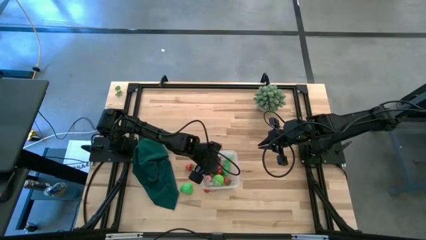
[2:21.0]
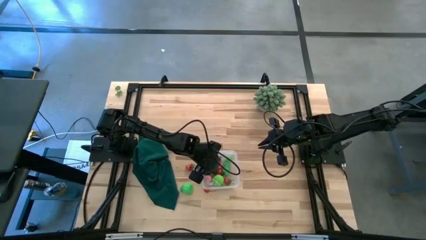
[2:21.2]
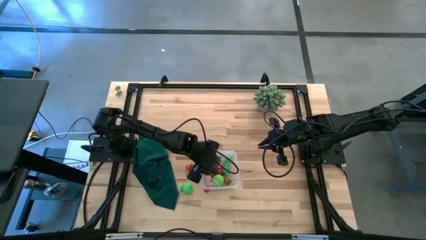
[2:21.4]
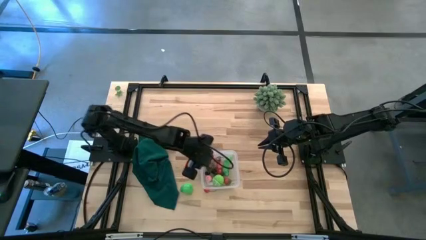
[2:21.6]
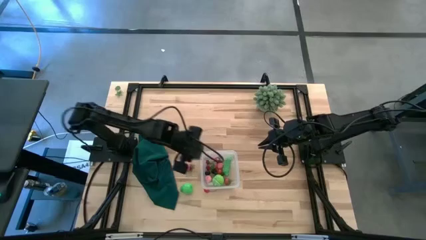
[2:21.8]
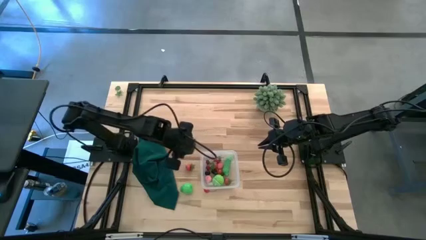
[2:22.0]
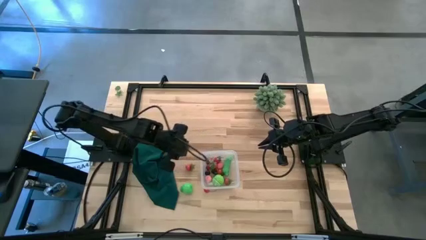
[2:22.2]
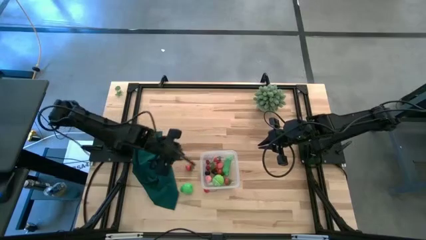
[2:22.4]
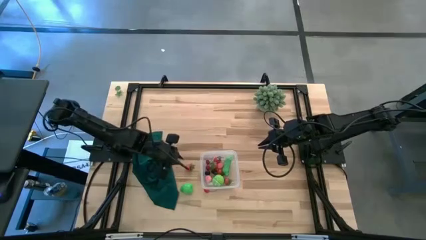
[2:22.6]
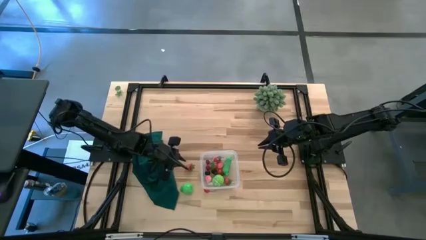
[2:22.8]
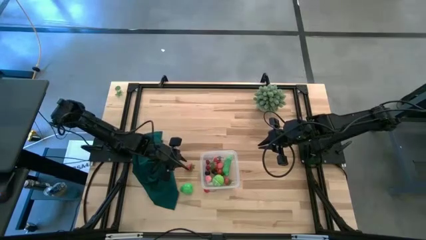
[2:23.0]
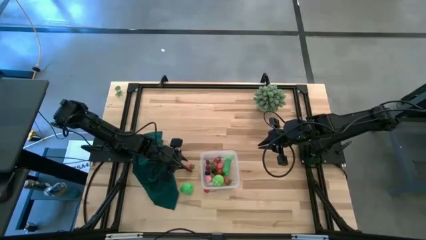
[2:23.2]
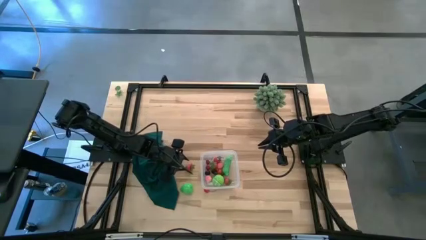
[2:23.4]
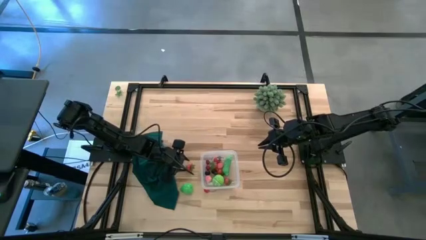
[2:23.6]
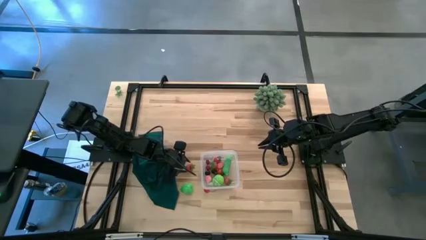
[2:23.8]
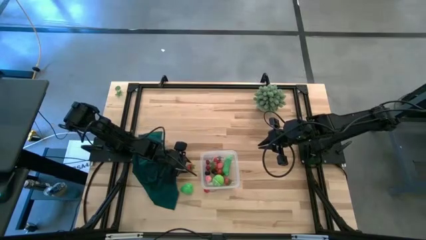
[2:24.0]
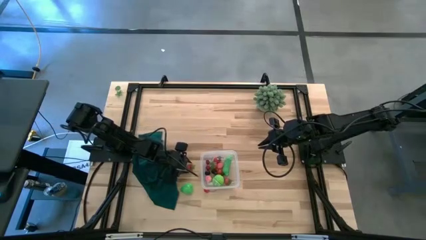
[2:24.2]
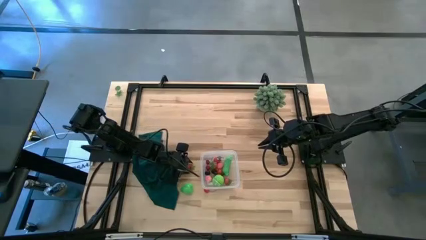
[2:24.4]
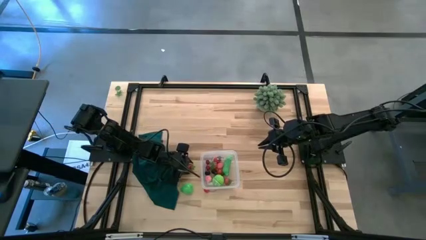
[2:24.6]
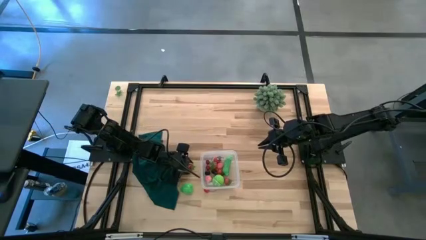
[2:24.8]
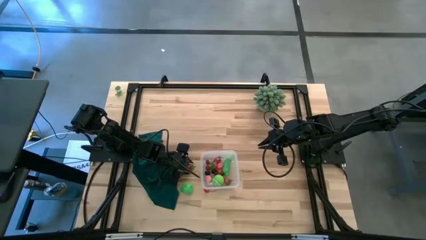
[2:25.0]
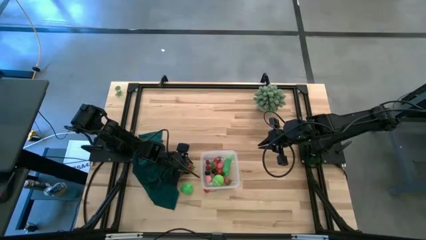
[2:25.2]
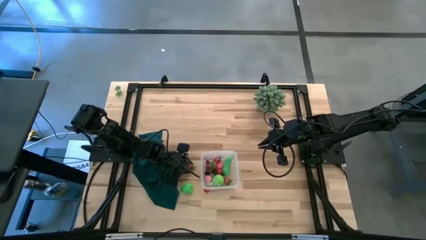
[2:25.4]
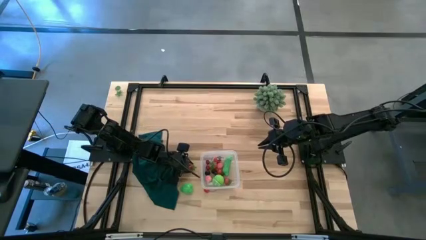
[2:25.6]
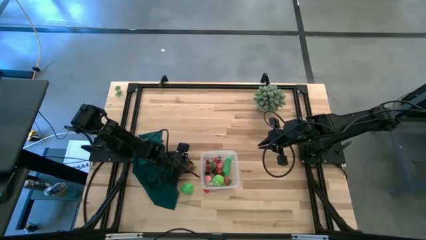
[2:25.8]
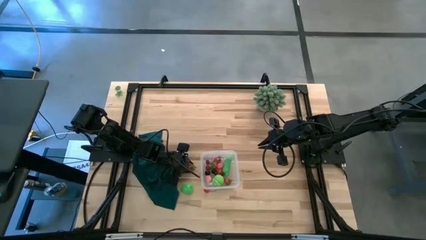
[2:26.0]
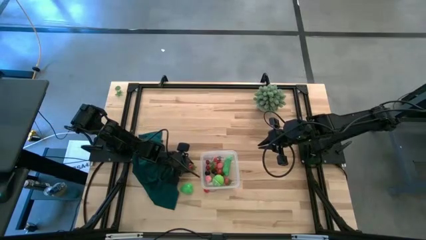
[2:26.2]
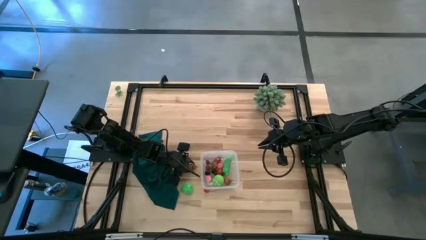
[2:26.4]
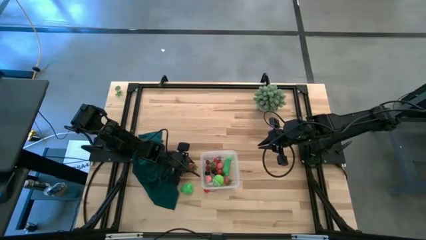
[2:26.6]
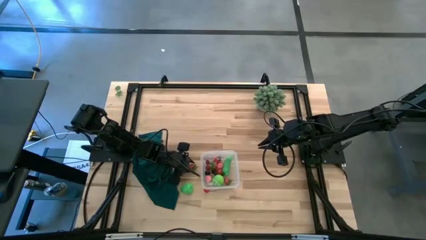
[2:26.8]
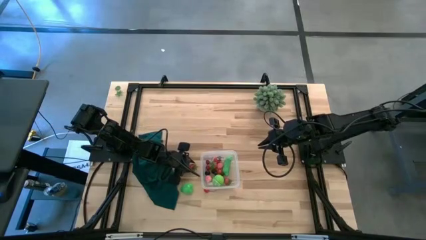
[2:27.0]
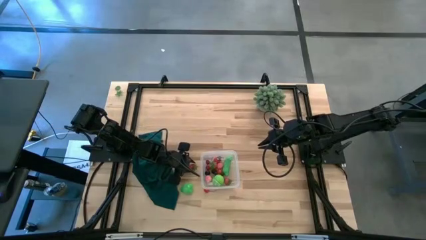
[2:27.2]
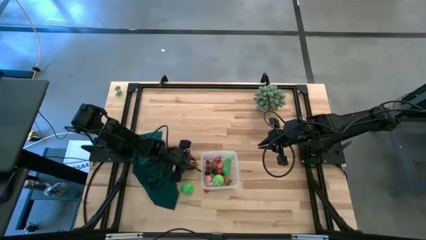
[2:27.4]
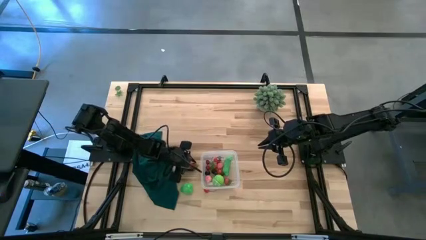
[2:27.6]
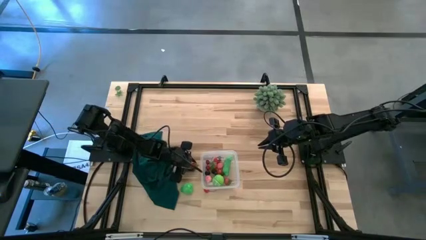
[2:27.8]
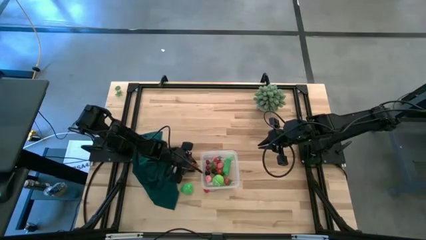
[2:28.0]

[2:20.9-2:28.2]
Task: Pick and placing Produce into tupperware
Put the red strawberry into the transparent bin

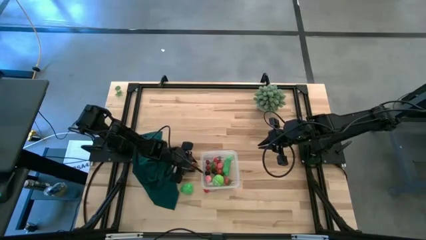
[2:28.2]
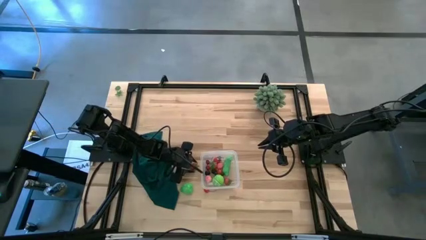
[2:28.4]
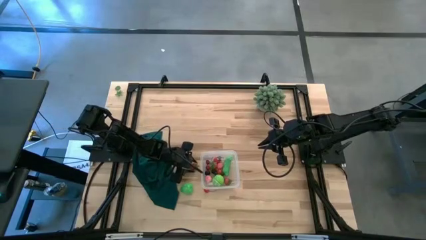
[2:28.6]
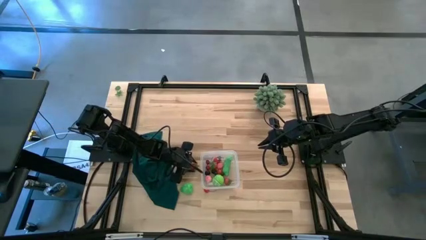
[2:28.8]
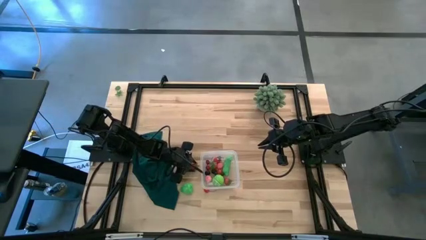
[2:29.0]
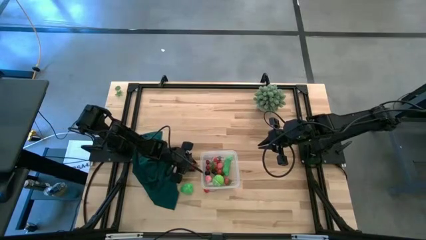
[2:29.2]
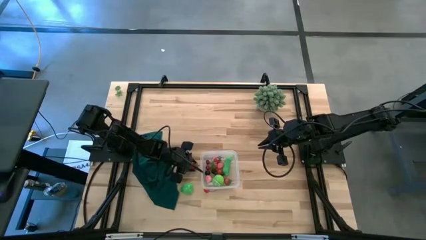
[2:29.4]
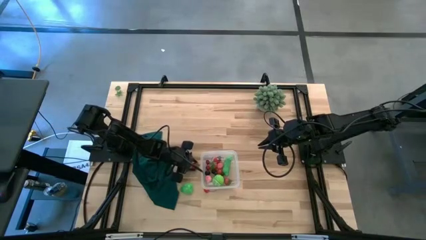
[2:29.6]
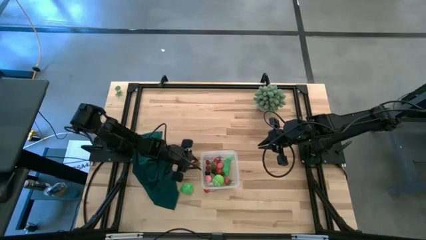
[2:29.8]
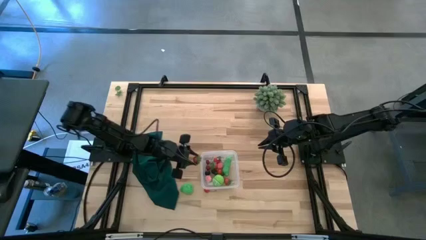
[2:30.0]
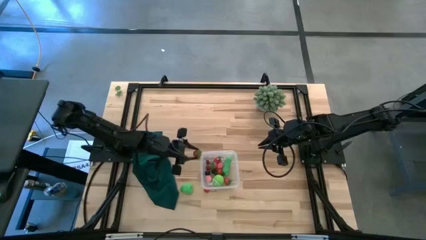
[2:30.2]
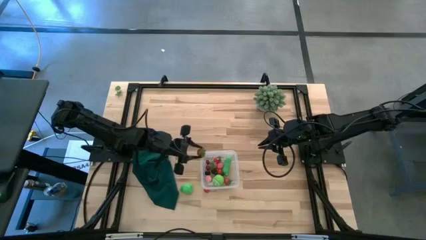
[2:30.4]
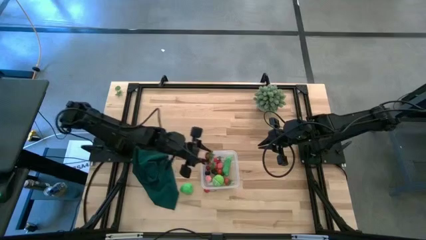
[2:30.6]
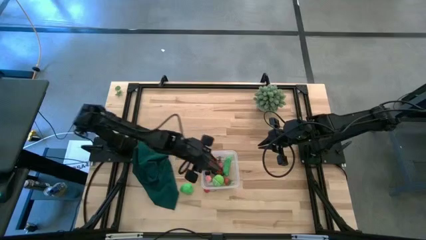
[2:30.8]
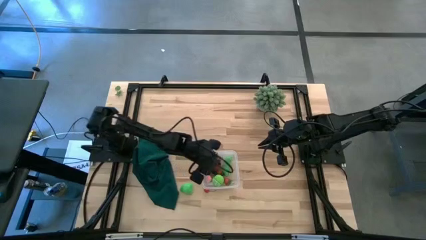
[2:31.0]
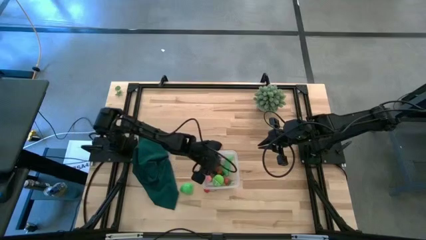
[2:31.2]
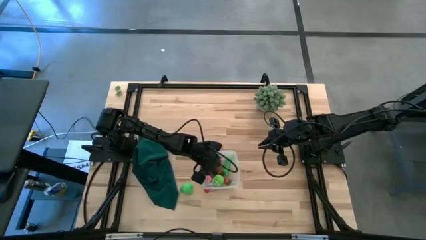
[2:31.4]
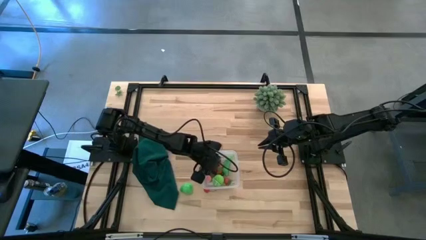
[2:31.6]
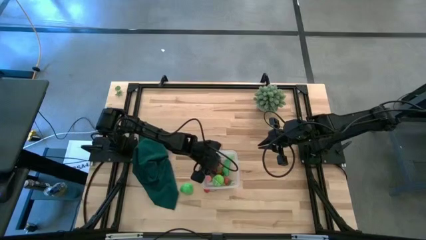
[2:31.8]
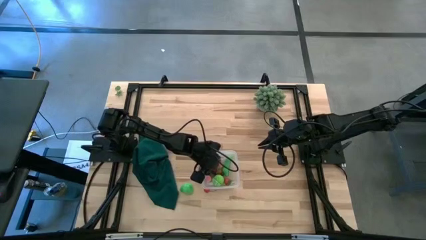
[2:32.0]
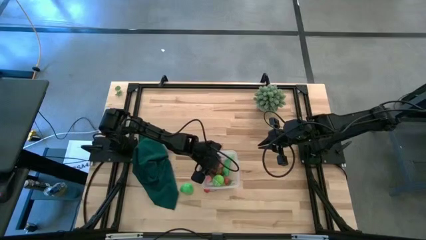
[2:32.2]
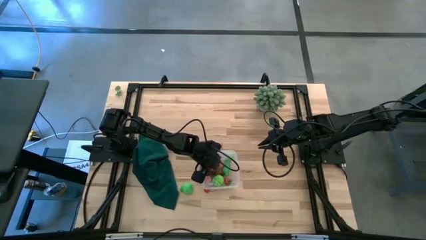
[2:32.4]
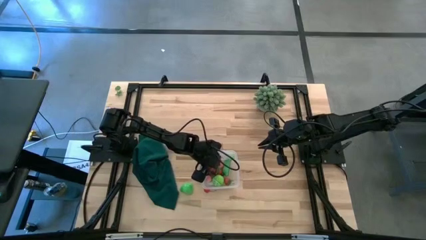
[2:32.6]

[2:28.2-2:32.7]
Put the red strawberry into the transparent bin

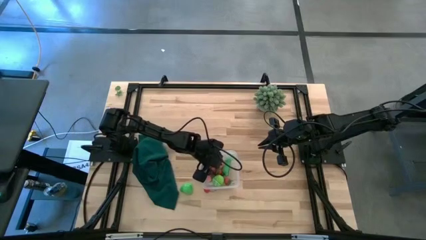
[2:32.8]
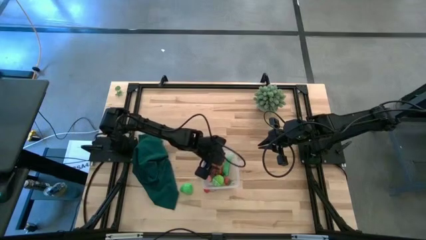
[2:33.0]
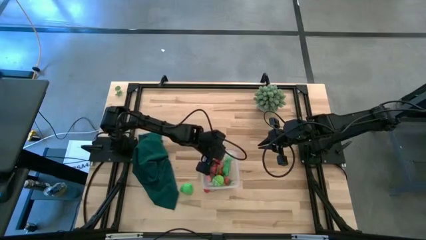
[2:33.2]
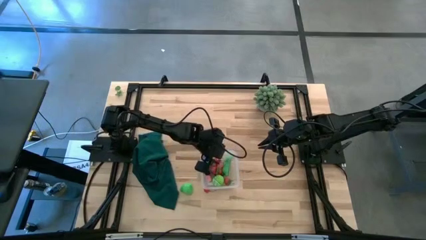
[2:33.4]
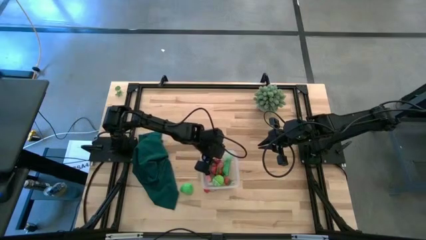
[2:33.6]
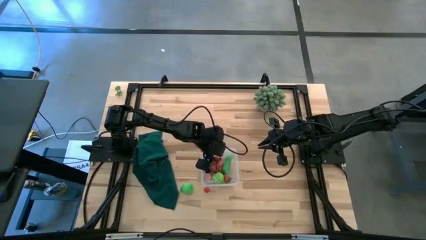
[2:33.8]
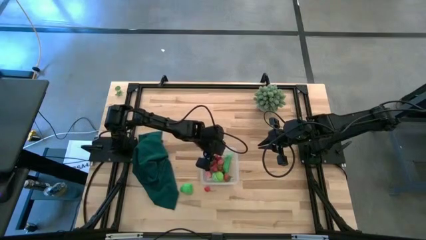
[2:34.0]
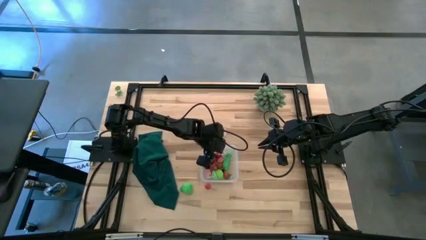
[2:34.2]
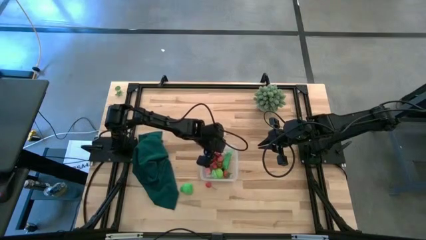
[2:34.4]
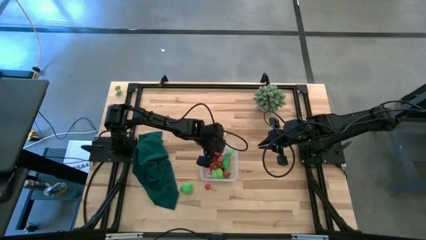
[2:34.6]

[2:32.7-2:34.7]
Adjust the transparent bin on the table

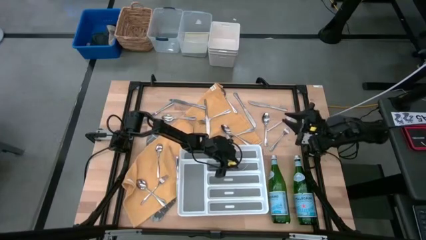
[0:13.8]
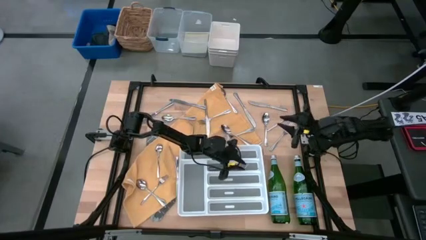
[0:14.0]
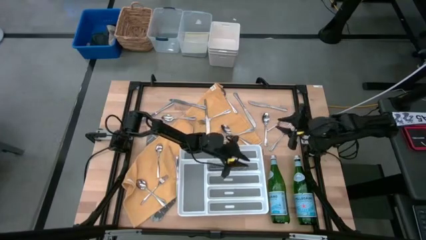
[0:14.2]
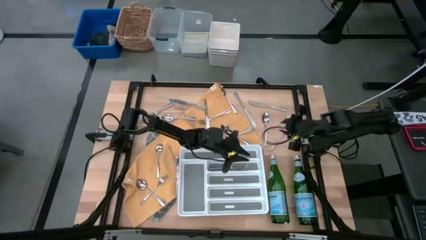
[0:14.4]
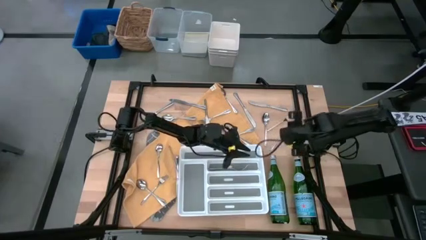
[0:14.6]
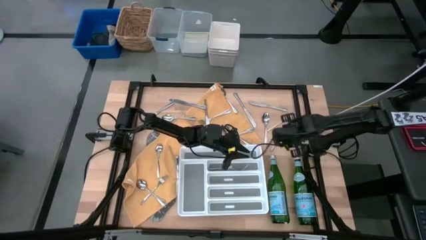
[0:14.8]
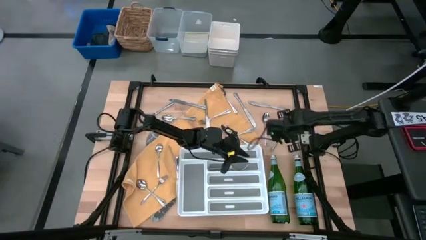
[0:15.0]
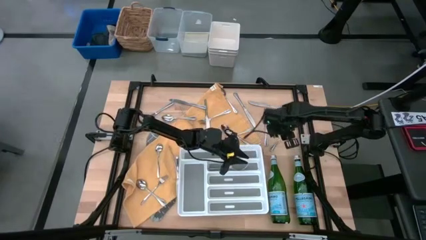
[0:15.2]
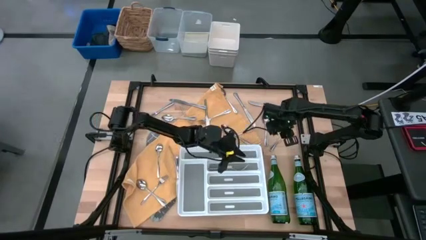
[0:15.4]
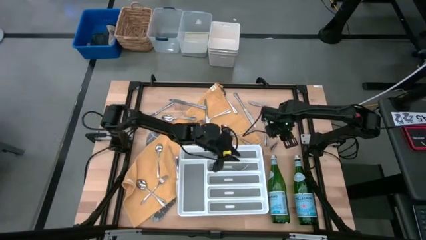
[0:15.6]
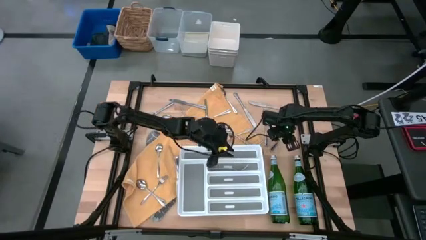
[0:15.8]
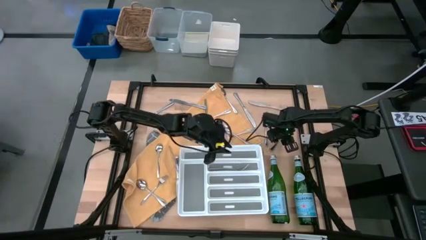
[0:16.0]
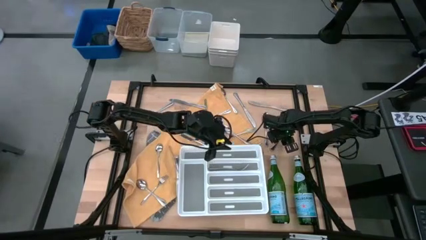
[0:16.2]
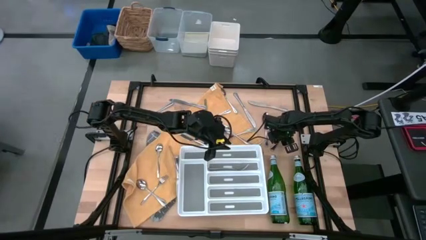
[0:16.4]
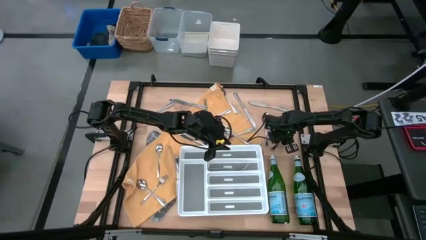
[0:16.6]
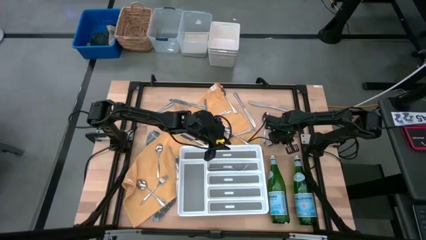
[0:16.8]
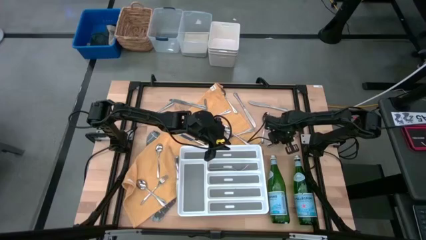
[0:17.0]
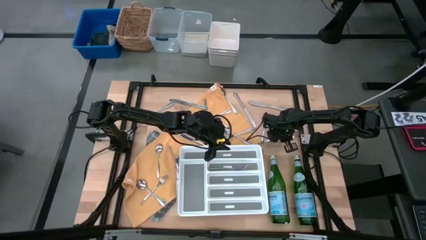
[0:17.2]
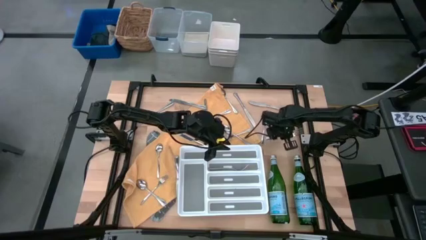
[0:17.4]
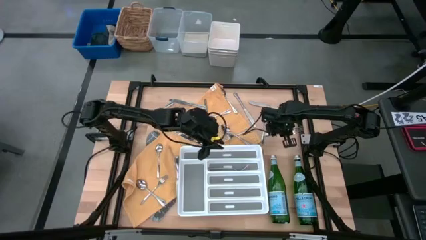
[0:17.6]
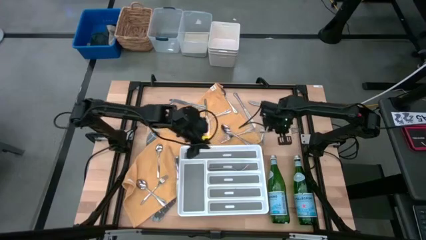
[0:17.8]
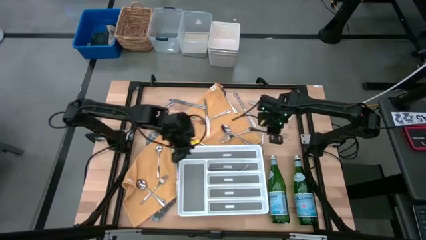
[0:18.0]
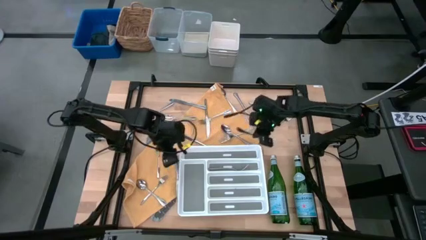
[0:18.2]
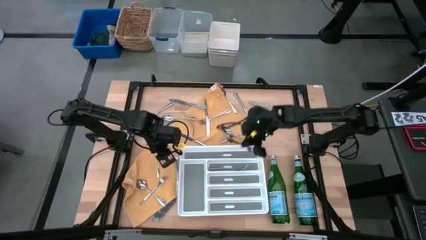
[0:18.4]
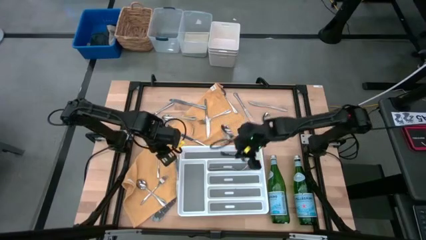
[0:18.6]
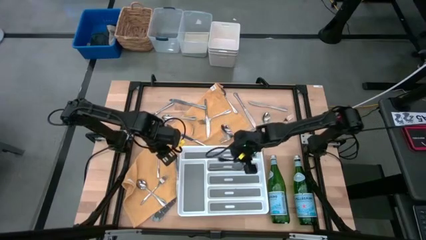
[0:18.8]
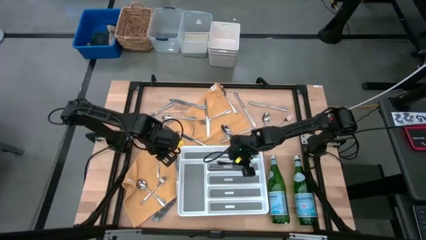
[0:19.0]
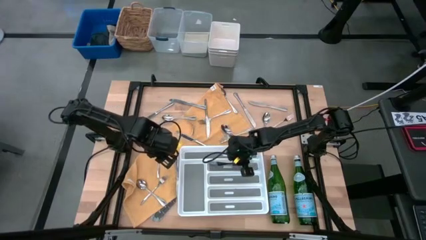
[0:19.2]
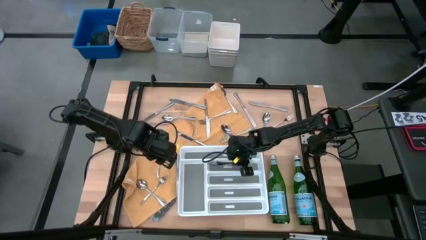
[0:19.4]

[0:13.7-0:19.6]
Task: Sort silverware
Put the silver fork into the white silverware tray
